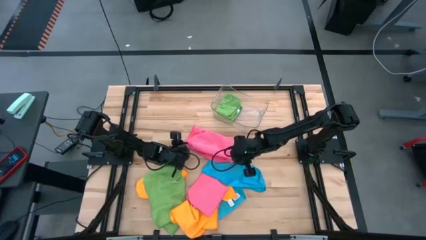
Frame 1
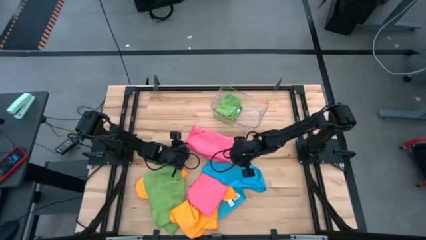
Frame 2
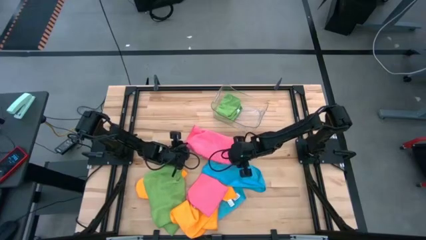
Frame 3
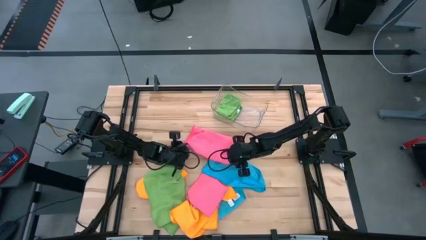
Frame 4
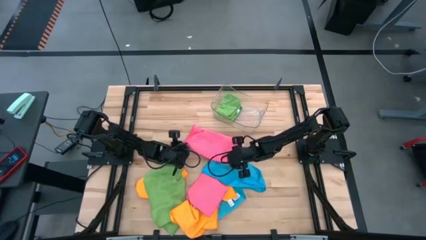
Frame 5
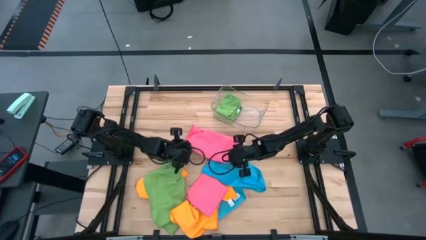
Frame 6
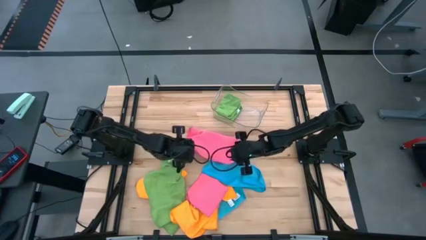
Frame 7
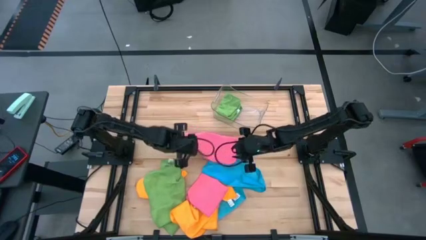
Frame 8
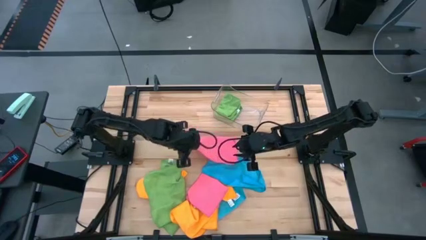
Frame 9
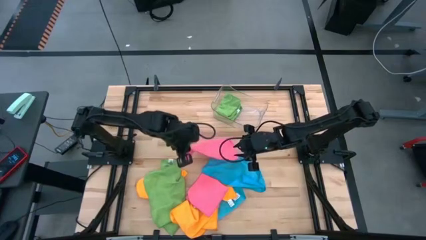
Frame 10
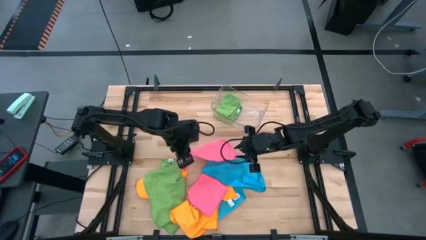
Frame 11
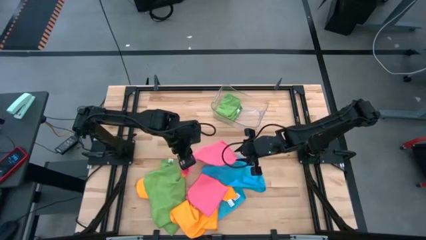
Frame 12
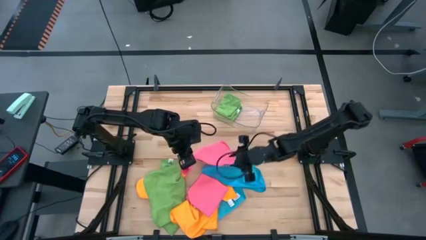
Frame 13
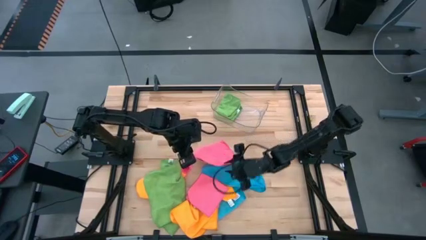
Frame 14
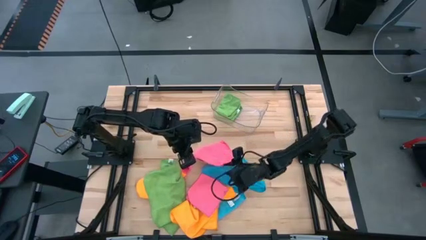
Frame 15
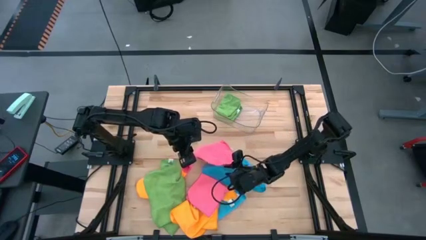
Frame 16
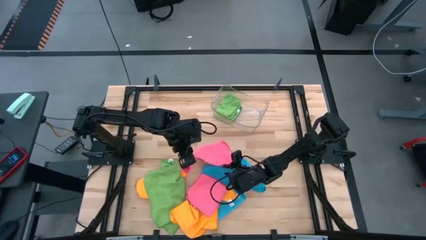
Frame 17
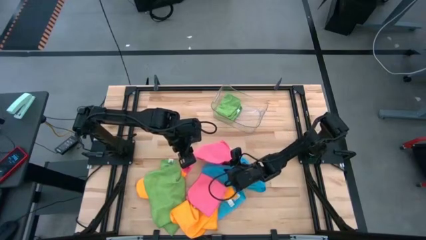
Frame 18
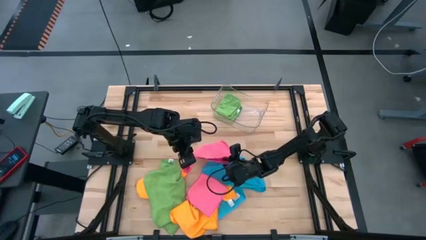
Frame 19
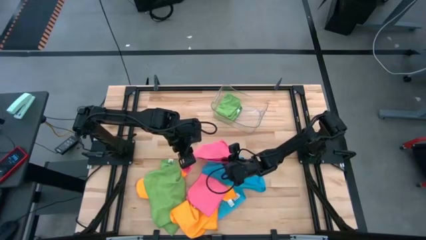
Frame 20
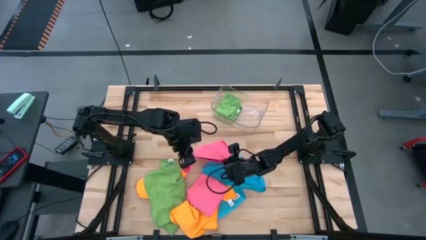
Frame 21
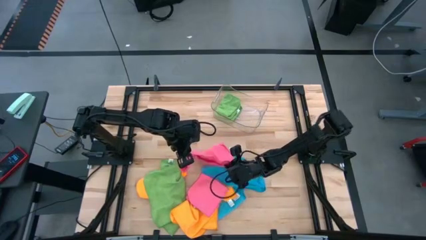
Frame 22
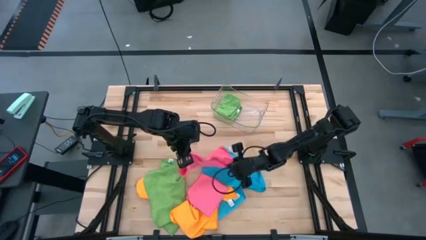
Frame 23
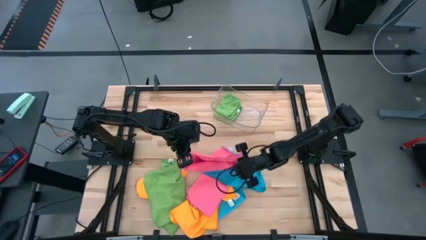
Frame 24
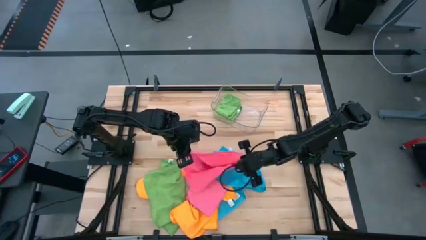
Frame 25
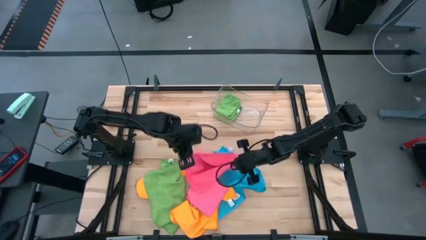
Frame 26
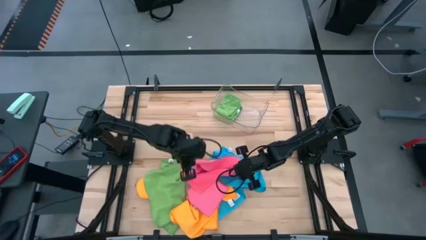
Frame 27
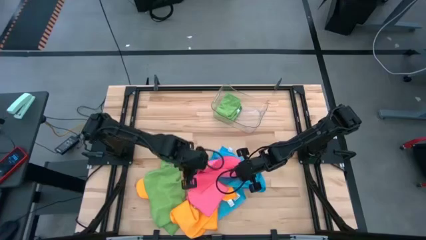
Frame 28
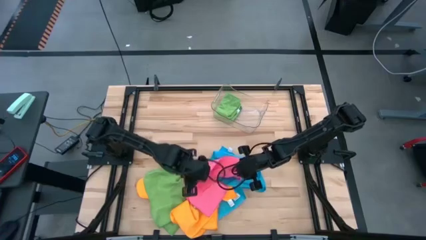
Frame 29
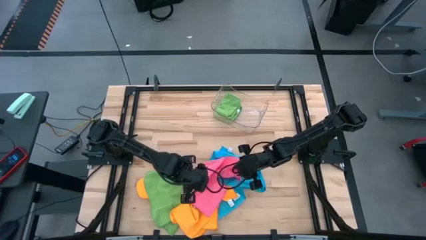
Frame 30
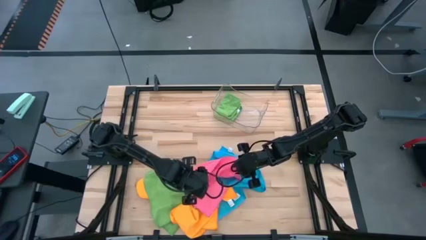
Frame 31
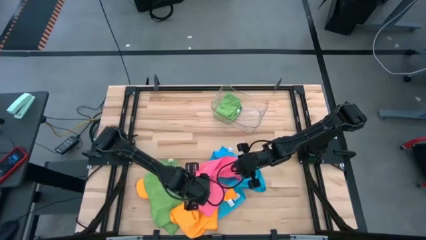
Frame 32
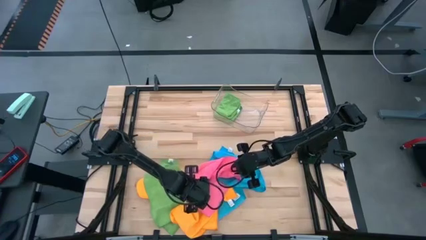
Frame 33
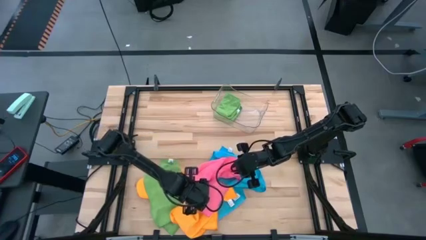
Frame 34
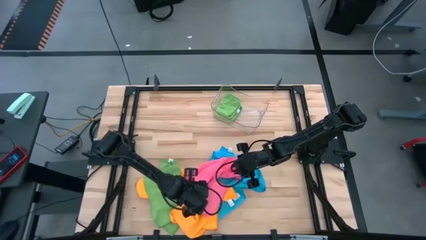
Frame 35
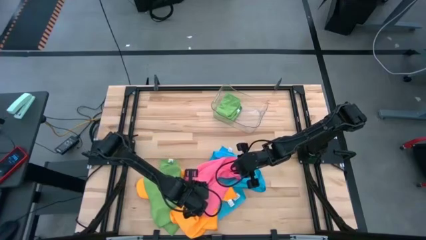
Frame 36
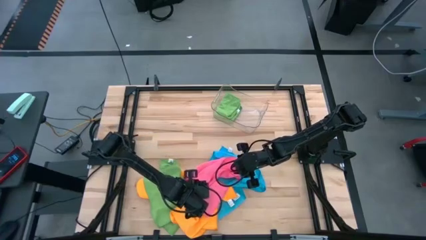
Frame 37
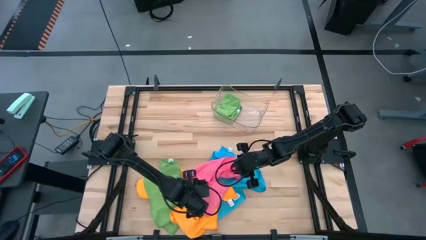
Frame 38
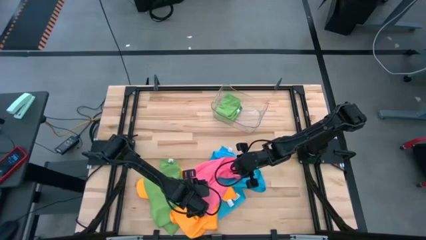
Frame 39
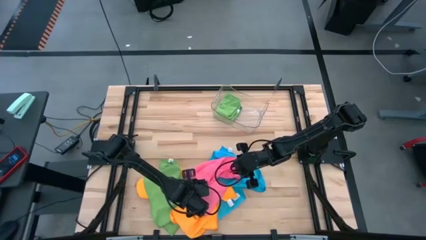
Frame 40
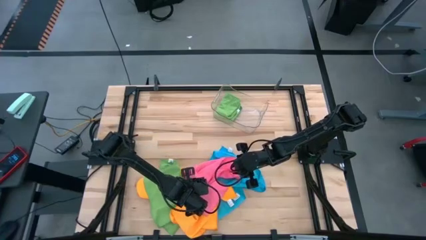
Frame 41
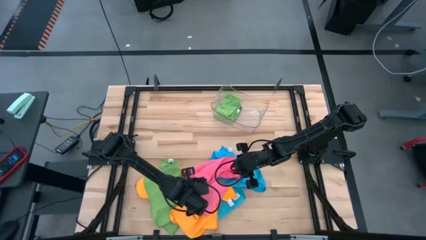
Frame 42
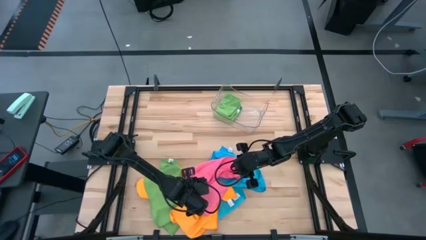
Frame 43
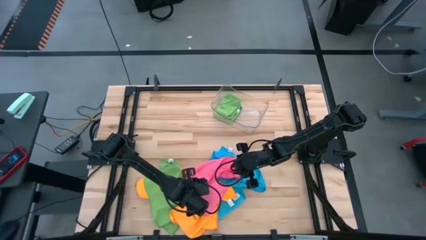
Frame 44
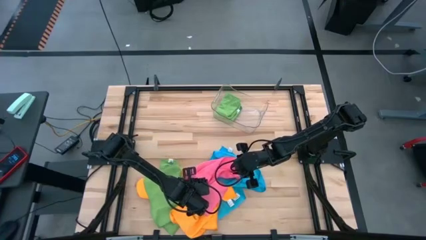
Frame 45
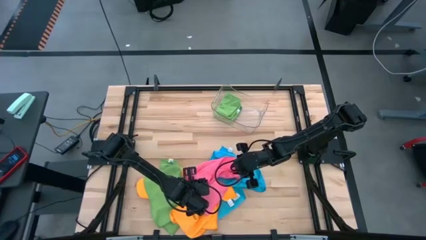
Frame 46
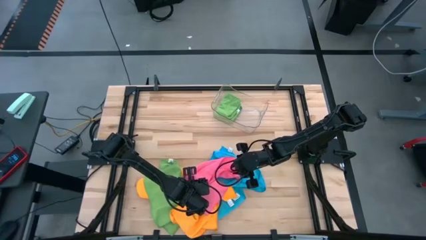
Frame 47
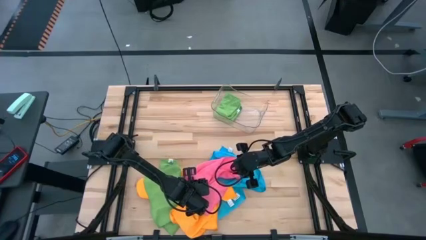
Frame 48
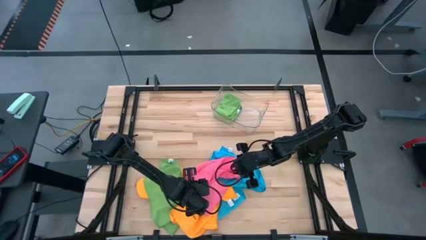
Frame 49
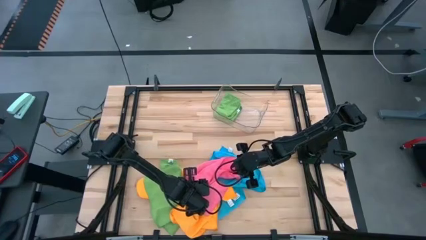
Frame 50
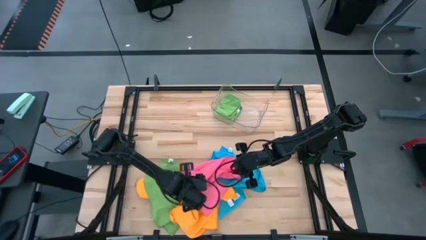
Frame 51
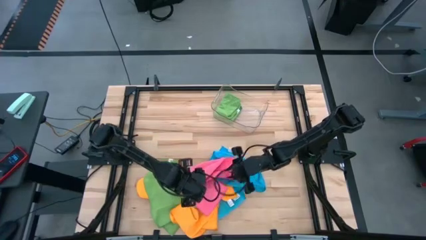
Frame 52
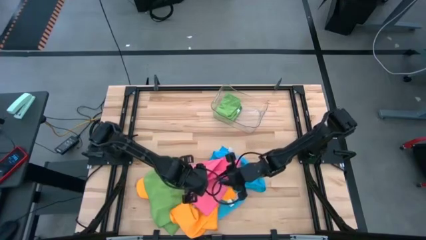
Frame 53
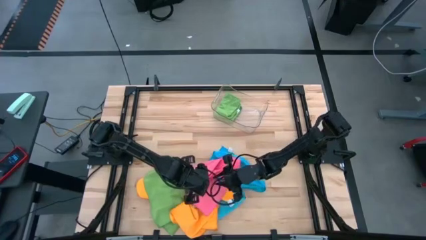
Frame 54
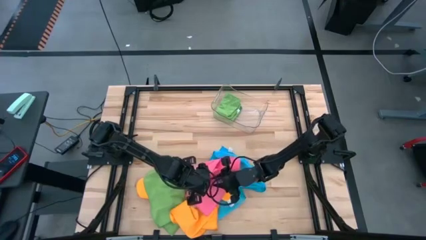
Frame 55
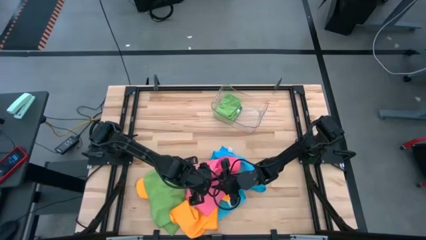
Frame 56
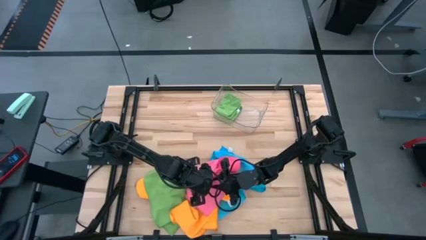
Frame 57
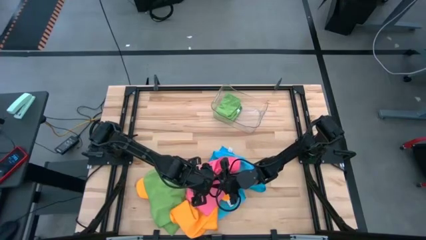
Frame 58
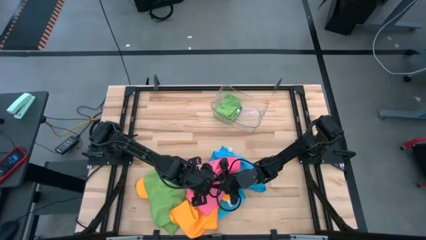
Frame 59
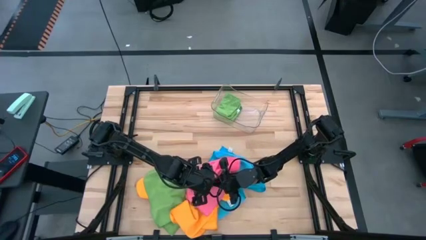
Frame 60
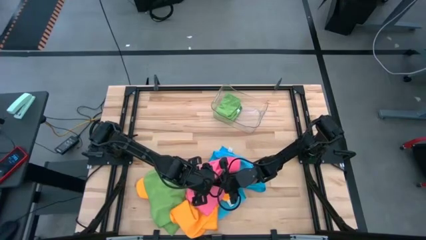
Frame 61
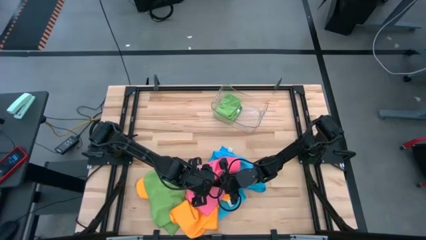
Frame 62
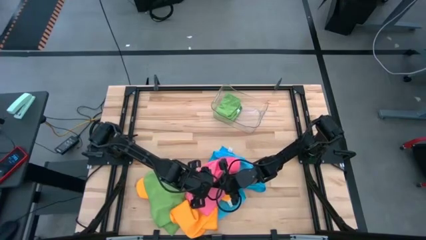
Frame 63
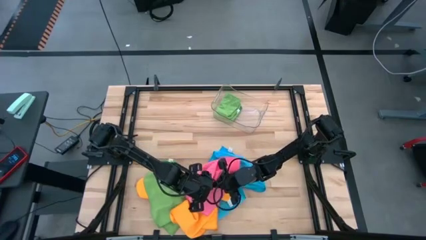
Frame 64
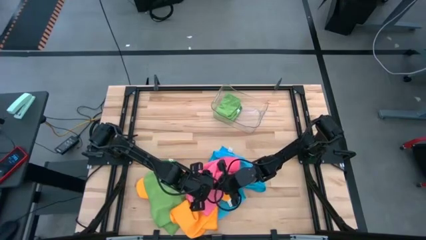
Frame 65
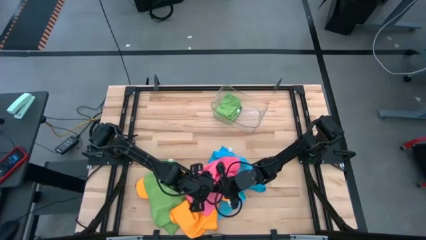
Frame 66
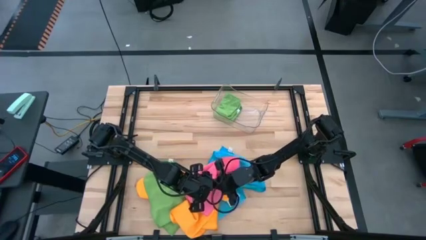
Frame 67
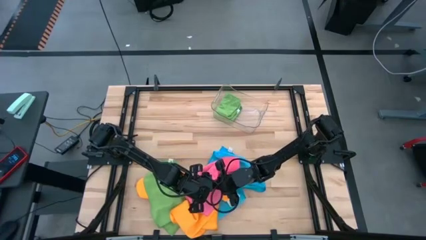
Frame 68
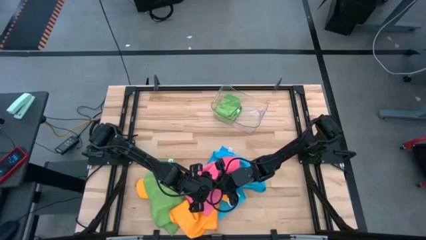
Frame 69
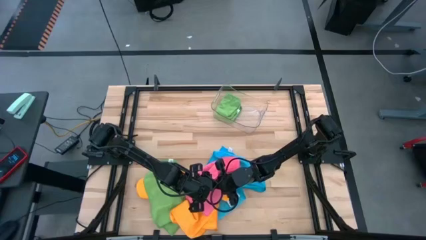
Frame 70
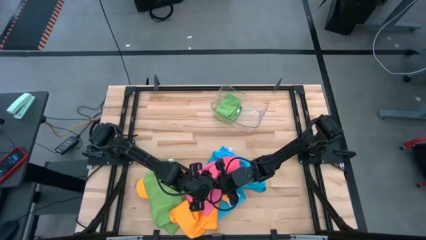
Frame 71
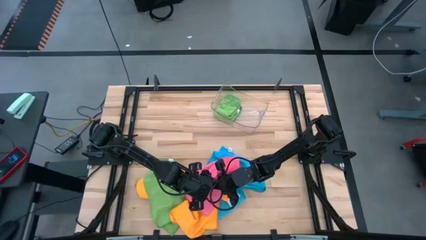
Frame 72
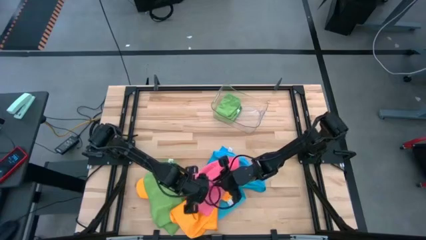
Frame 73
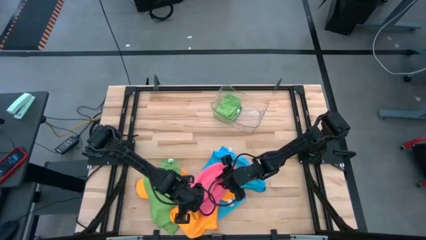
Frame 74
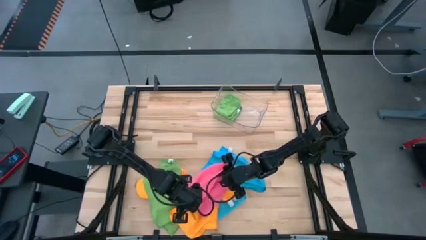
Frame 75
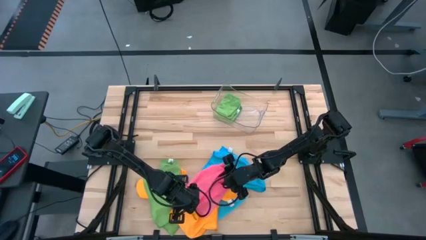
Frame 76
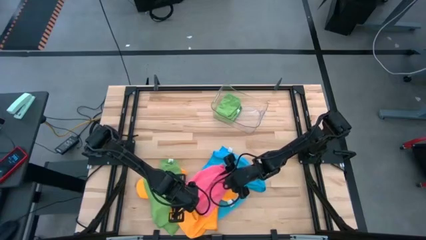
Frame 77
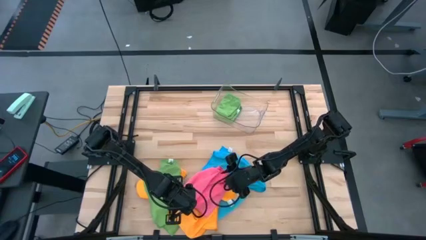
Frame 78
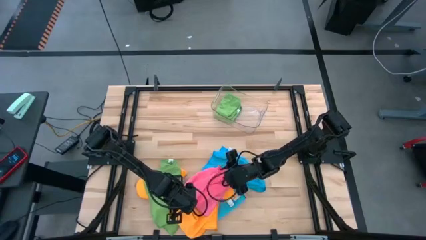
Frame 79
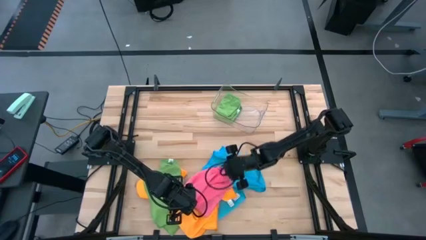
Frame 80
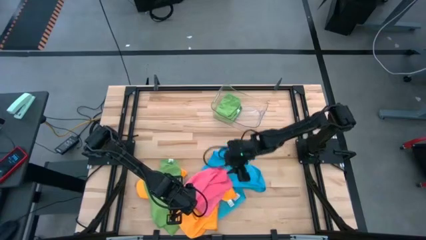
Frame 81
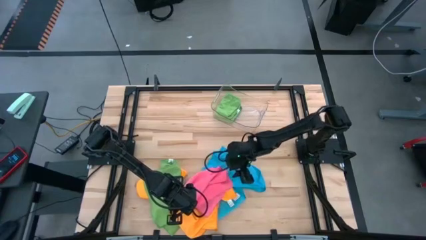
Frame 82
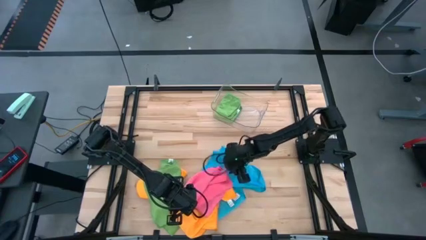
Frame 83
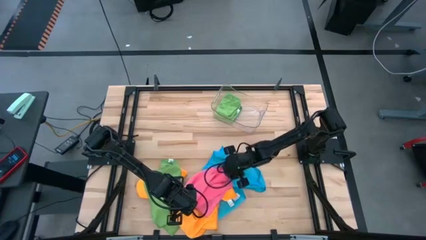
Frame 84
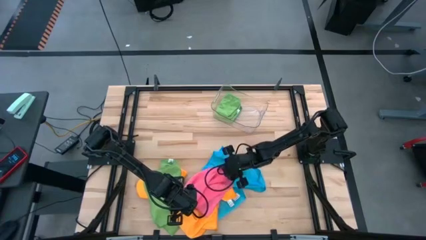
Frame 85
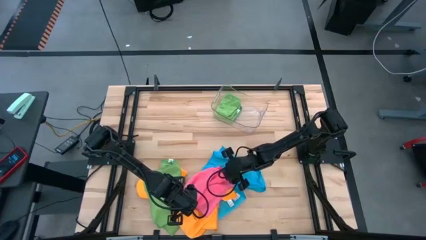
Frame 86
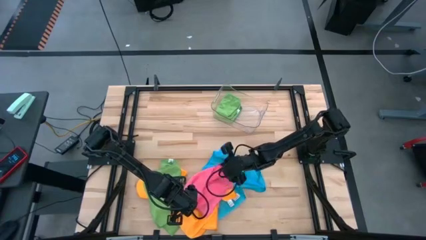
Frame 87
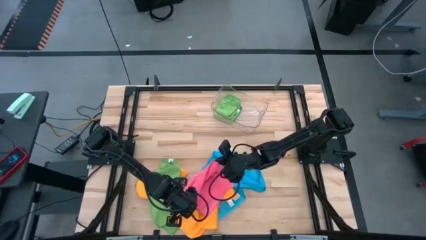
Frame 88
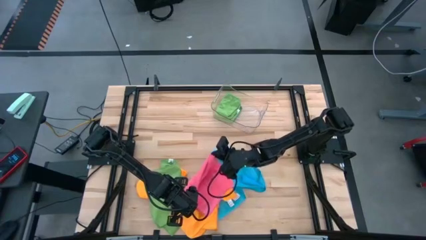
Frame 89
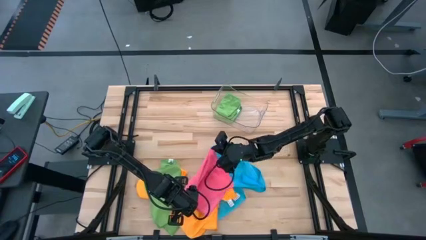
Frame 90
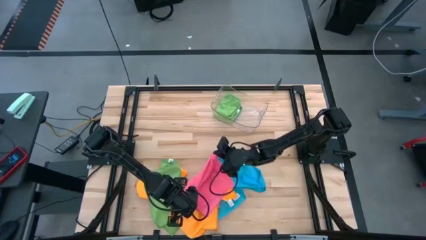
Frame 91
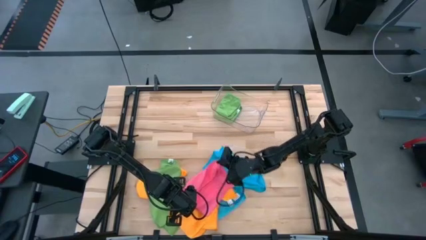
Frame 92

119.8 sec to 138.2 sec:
Task: Fold microfiber towels
Fold the top pink towel
